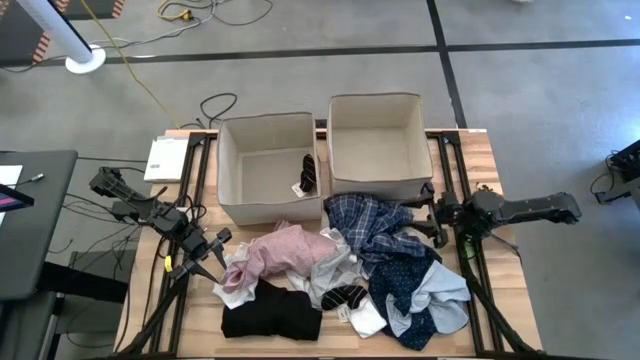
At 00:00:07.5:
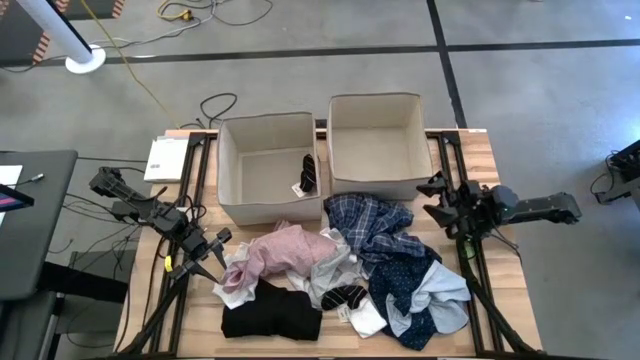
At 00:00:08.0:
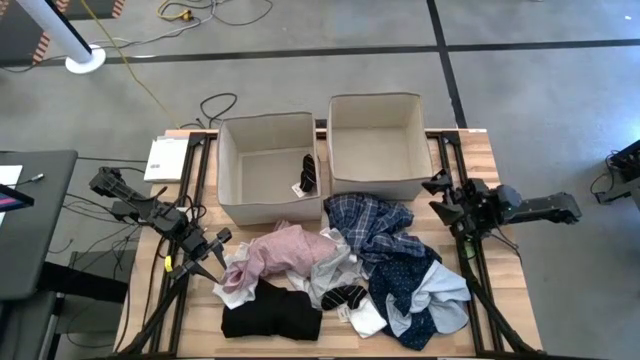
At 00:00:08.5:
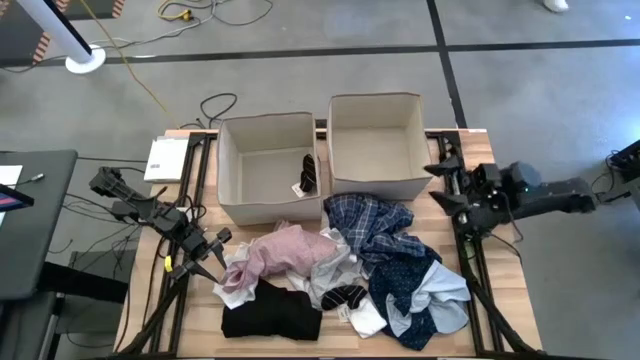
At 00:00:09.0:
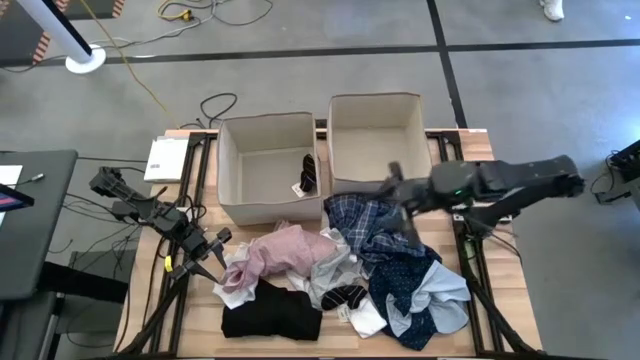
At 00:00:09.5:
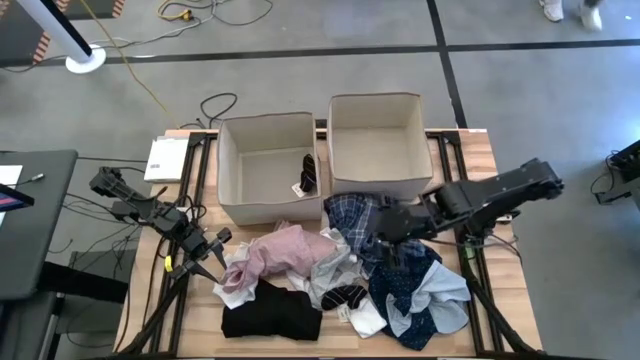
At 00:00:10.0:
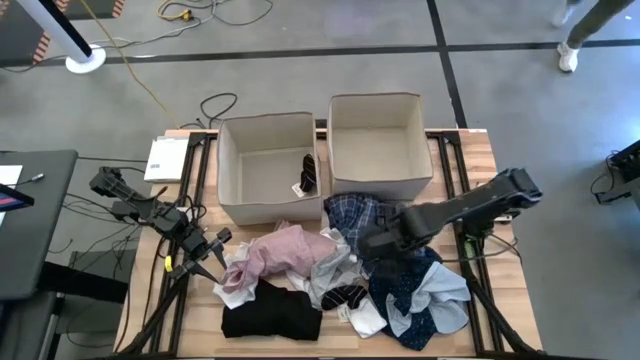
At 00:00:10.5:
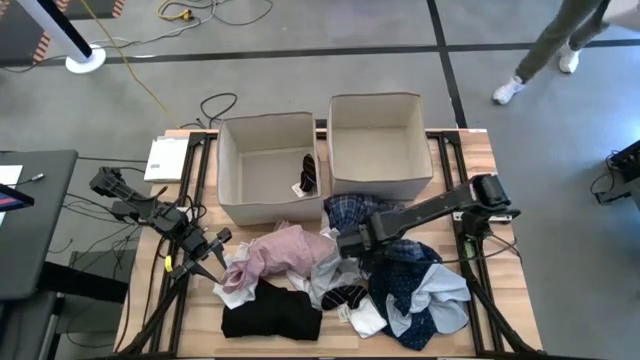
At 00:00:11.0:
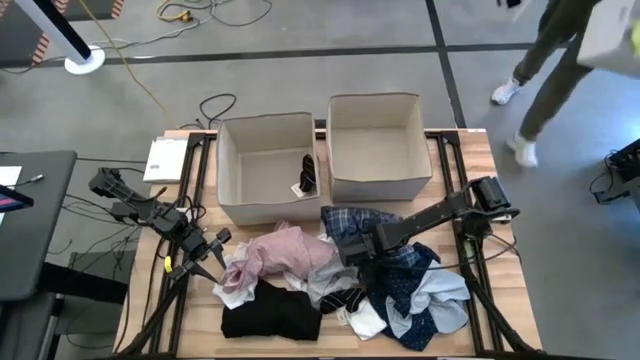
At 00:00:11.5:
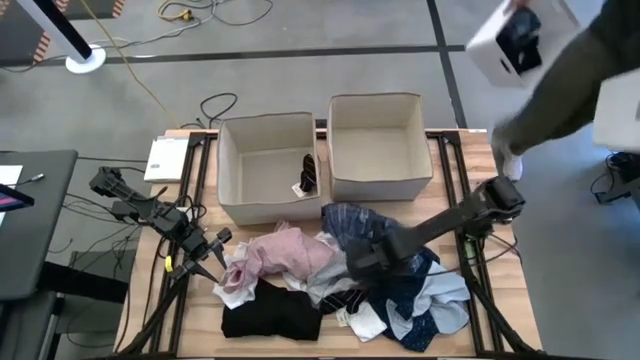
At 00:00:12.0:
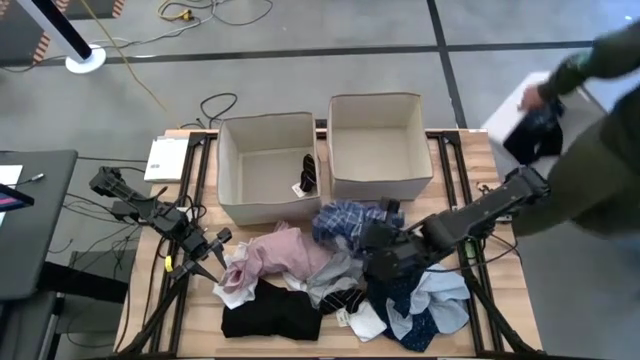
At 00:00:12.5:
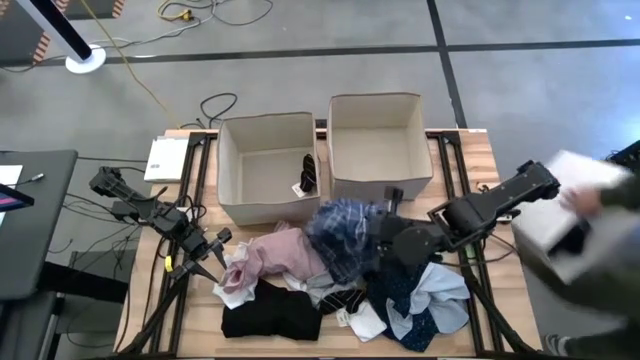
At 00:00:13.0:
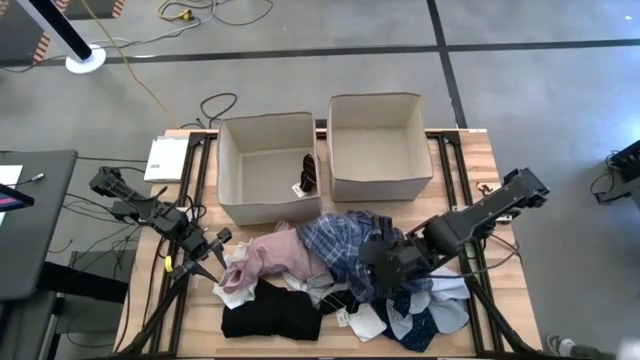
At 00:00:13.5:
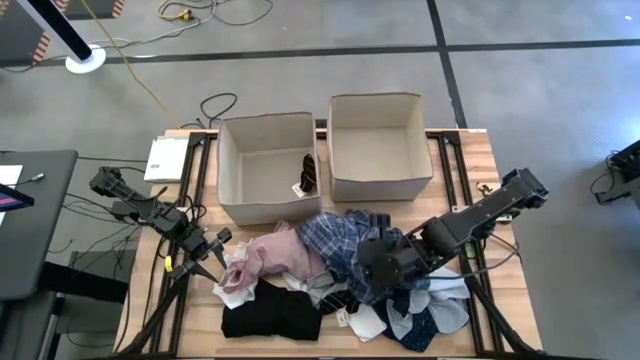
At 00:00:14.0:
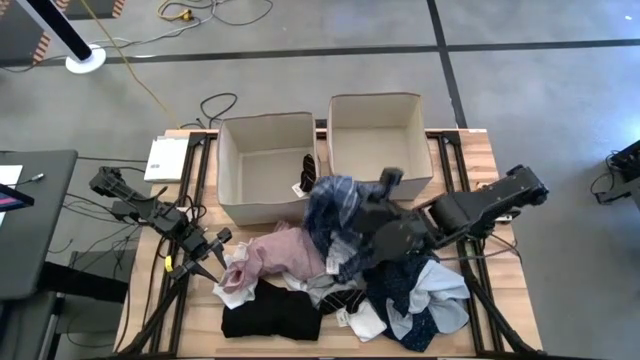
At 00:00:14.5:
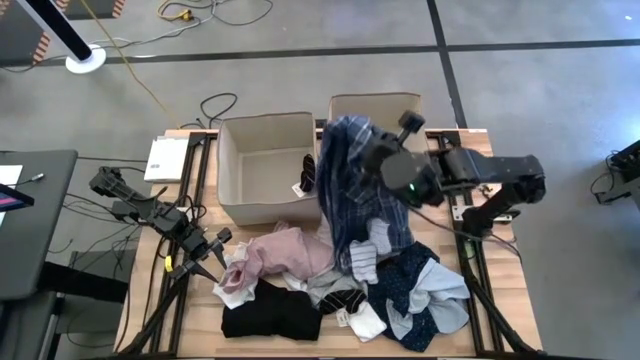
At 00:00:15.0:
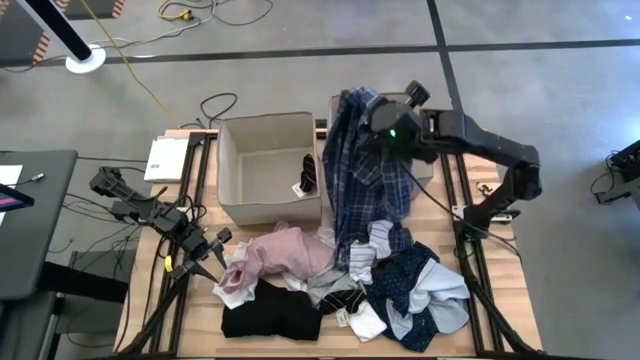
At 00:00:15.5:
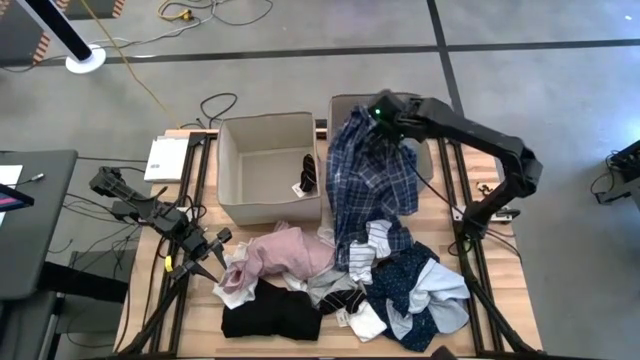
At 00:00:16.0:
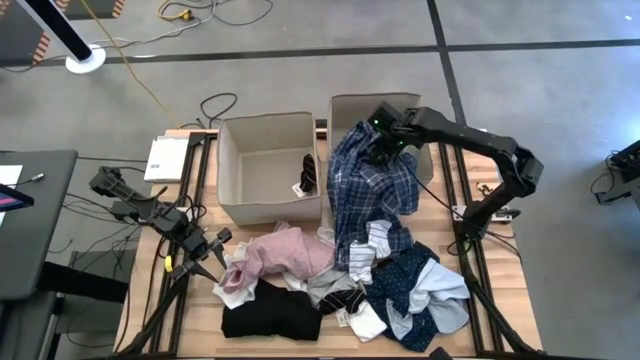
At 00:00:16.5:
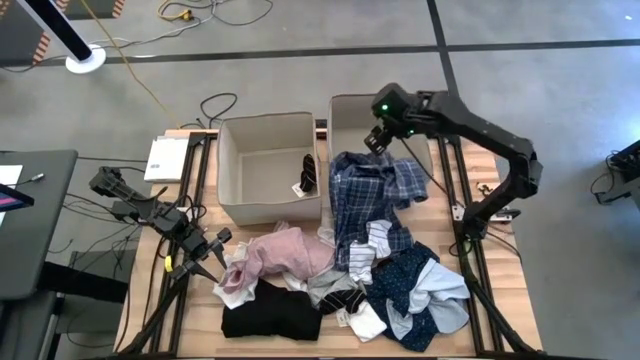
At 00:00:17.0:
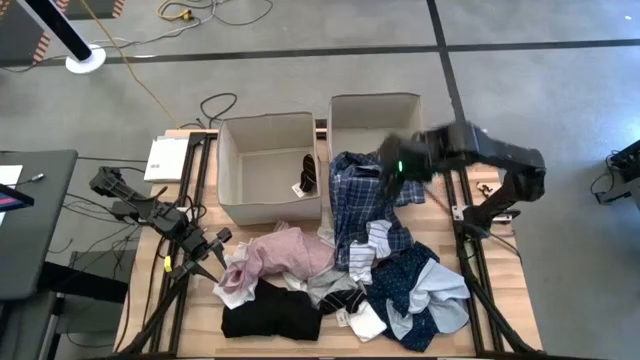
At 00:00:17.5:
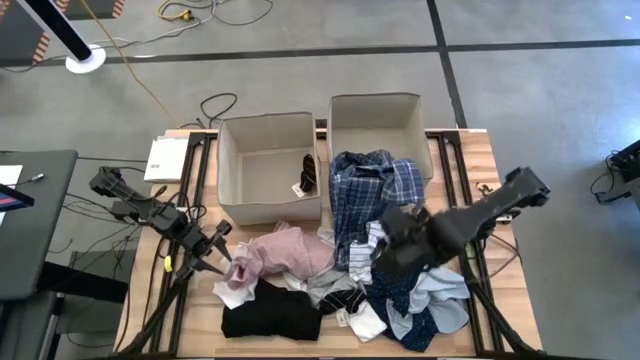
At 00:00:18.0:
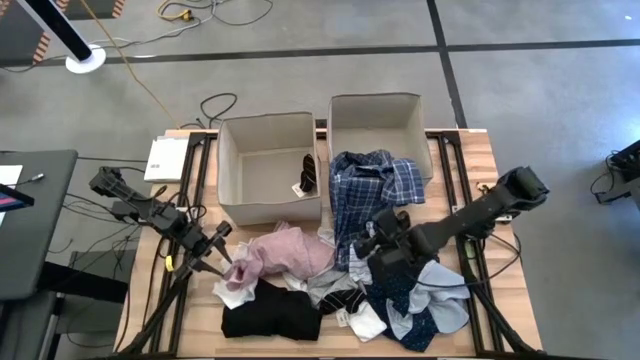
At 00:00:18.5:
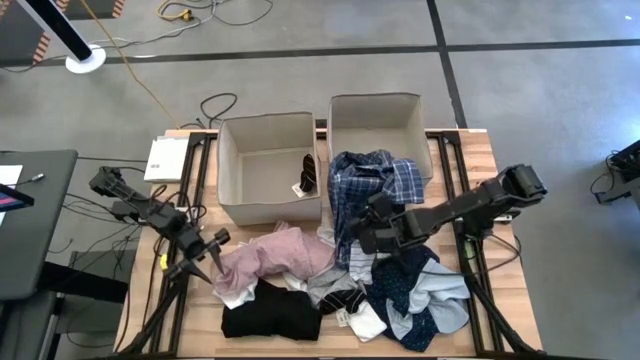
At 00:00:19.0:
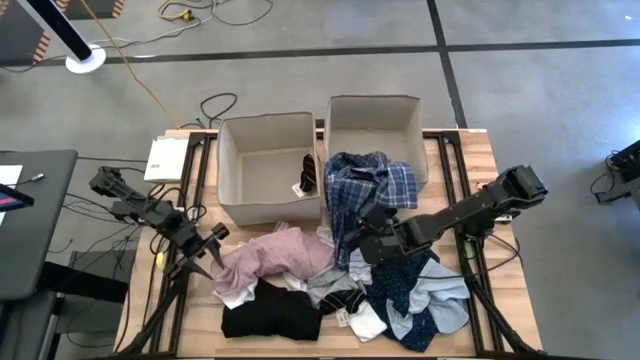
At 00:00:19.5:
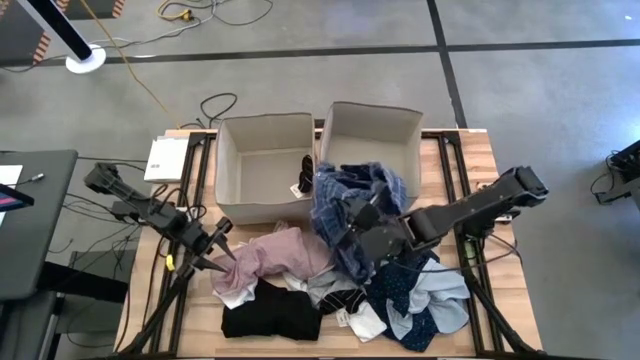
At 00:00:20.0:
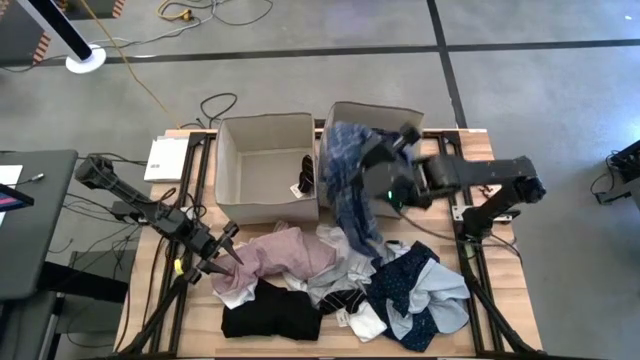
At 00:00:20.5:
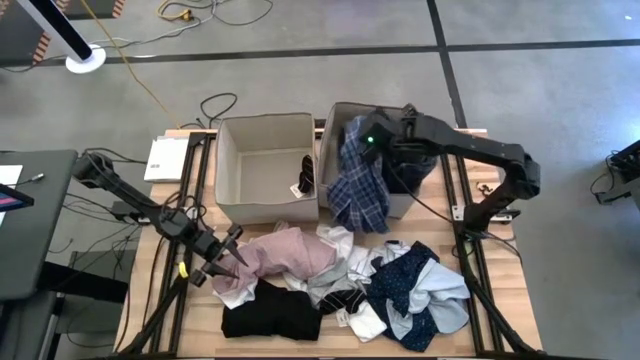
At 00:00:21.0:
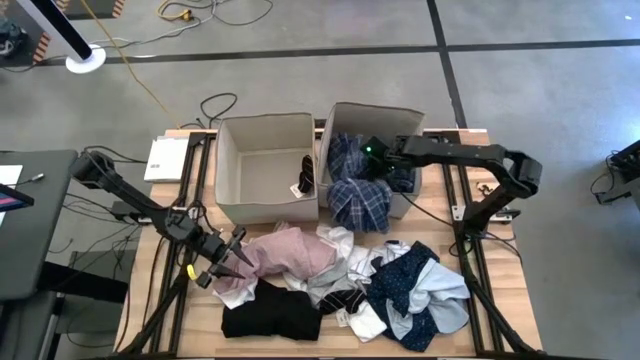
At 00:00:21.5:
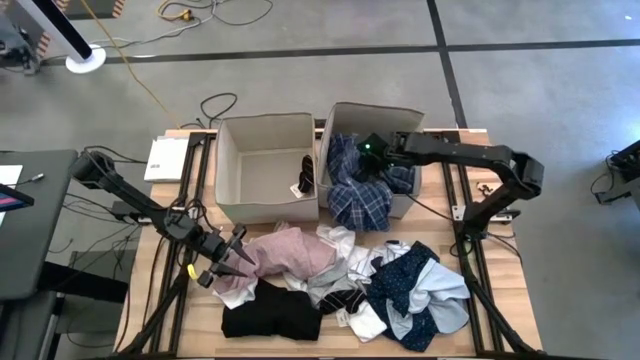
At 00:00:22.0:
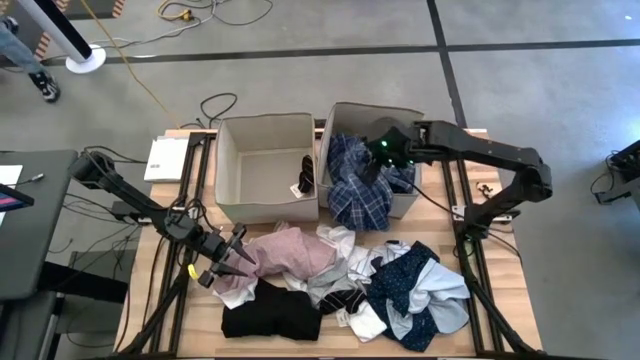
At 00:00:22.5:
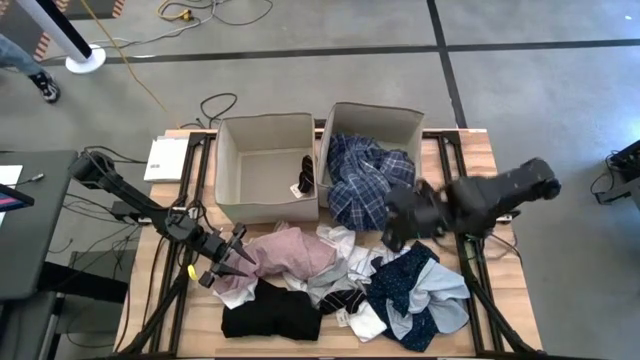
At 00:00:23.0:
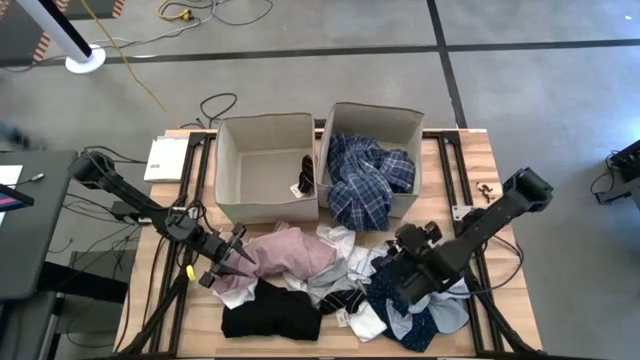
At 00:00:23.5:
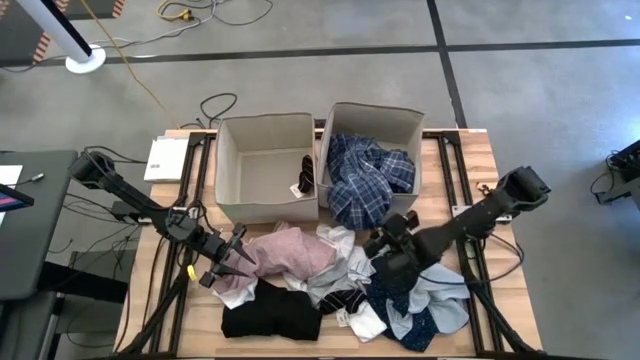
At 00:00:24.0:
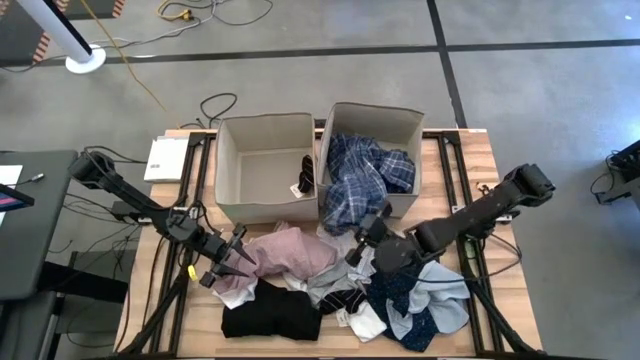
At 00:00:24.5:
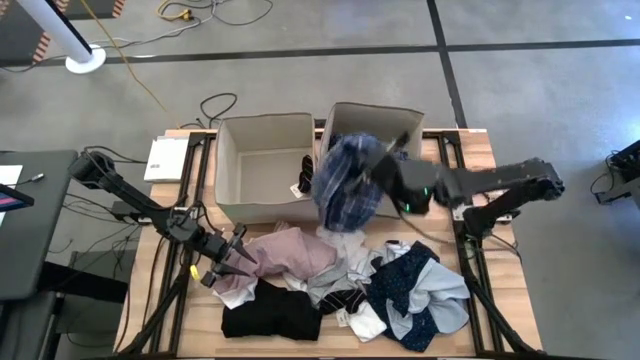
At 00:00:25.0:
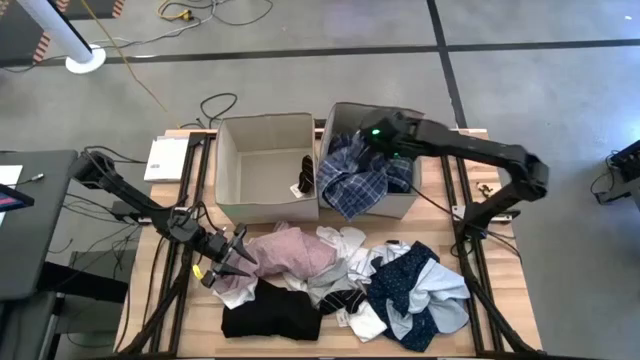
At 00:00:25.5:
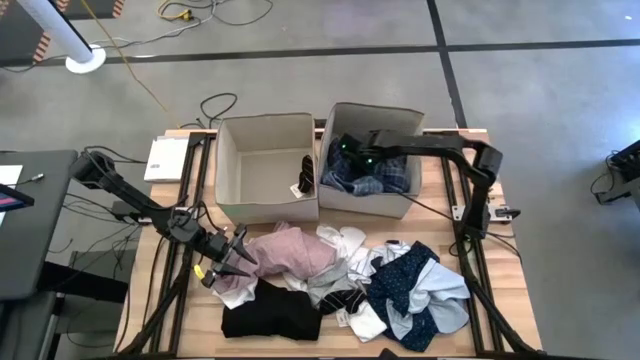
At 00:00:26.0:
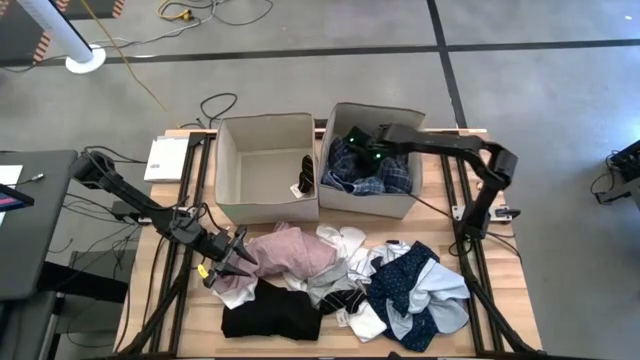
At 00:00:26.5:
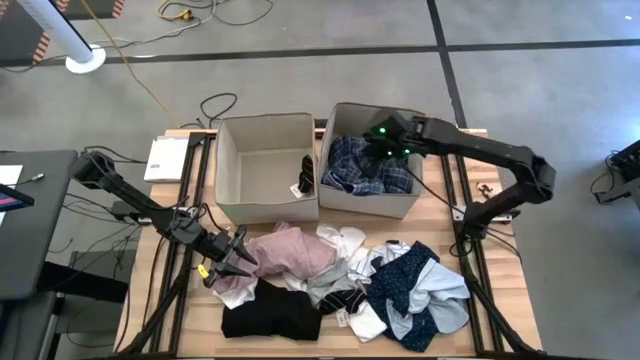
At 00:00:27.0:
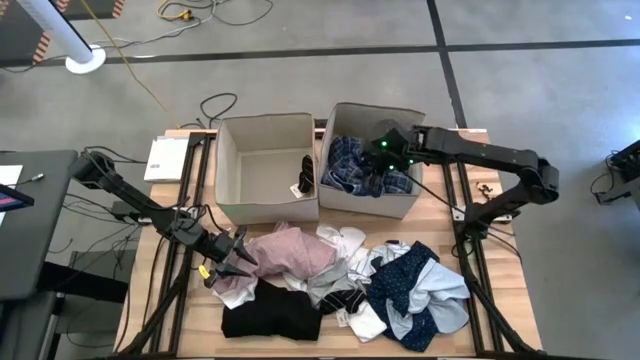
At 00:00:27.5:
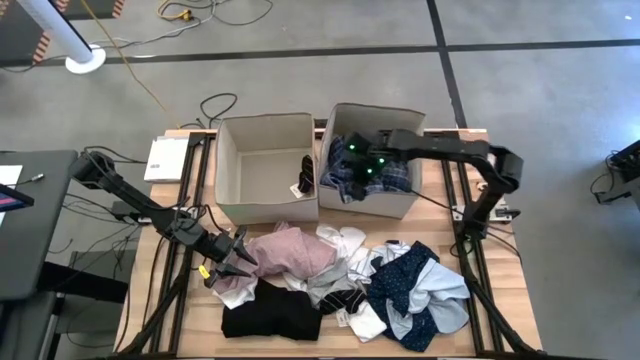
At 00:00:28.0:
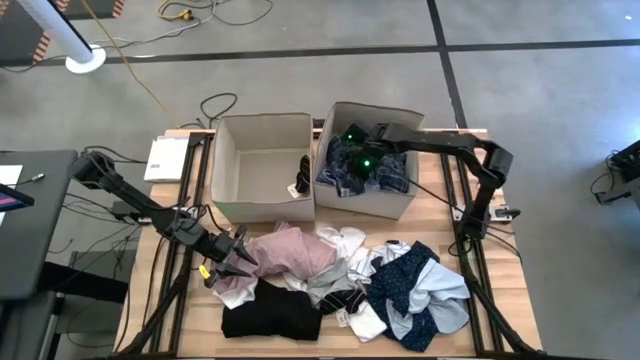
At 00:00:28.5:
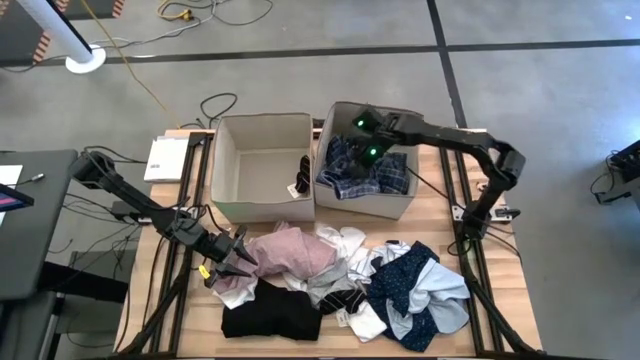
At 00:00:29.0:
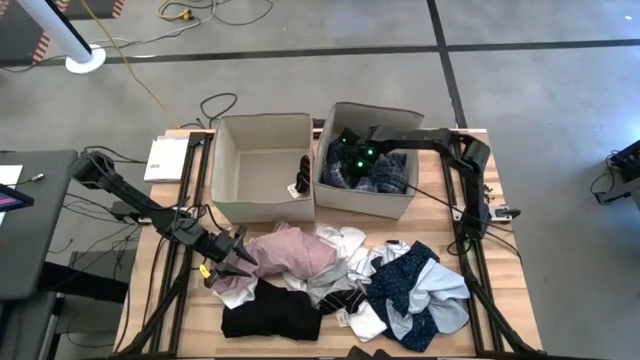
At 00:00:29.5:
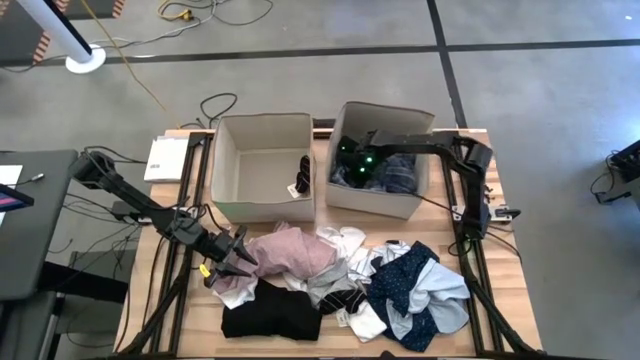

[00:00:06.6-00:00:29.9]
Task: Sort clothes
Put the blue pants into the right white laundry bin
